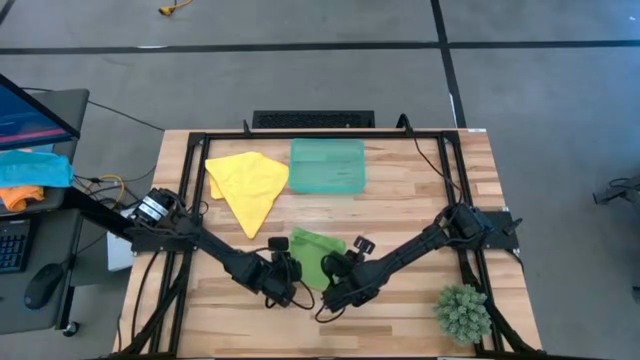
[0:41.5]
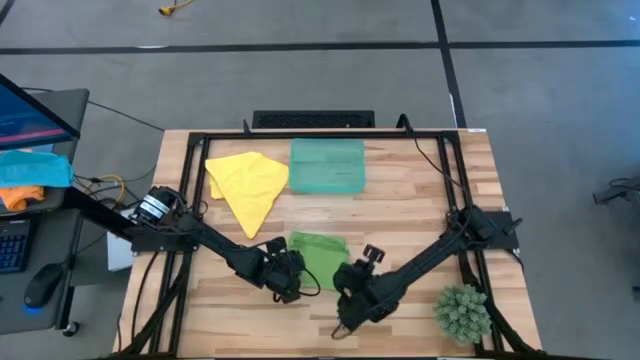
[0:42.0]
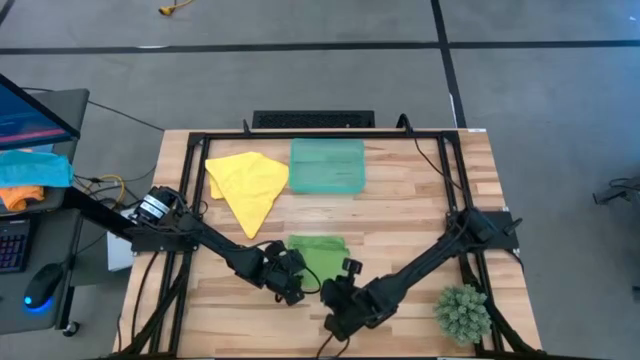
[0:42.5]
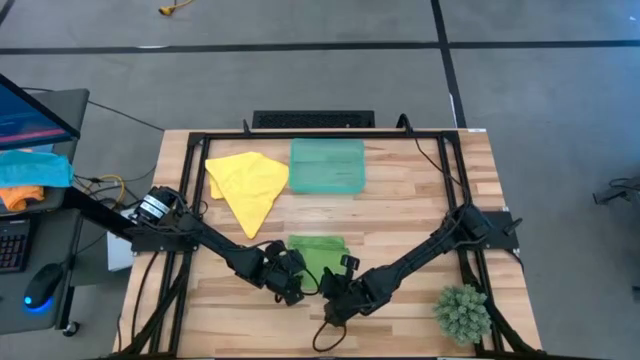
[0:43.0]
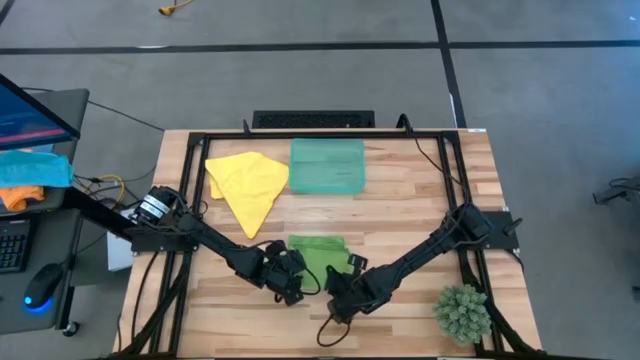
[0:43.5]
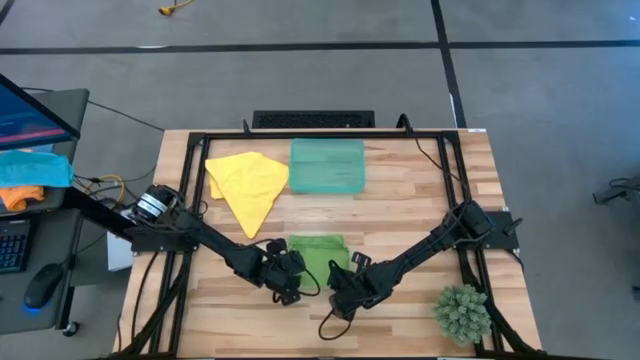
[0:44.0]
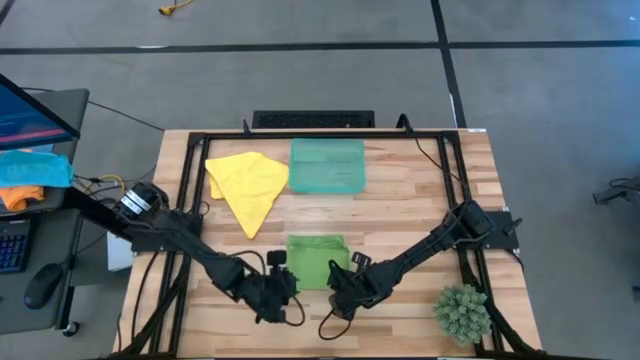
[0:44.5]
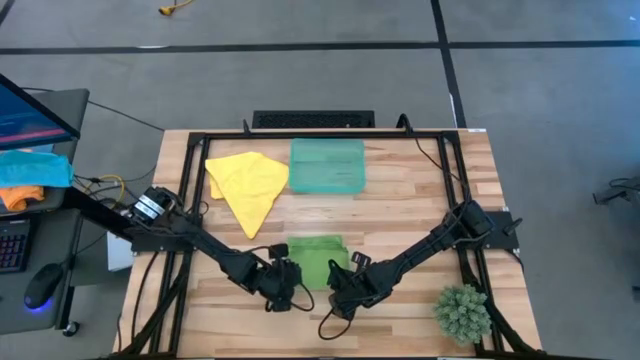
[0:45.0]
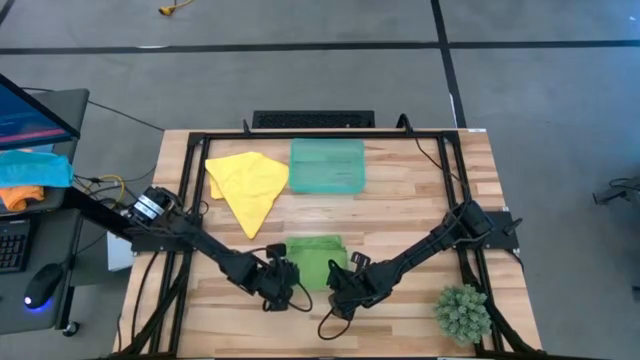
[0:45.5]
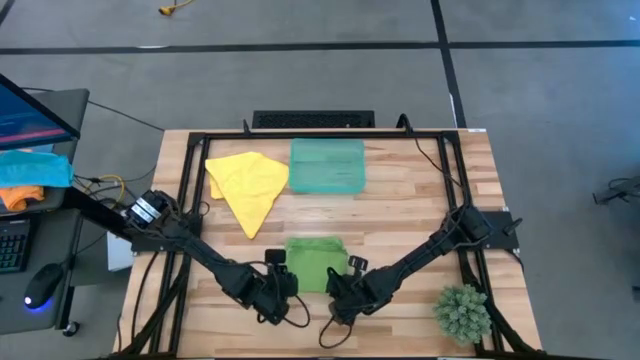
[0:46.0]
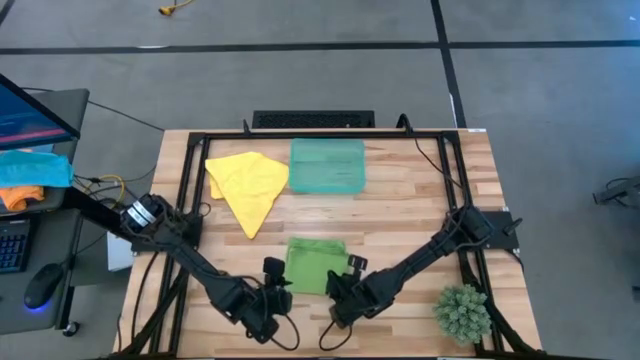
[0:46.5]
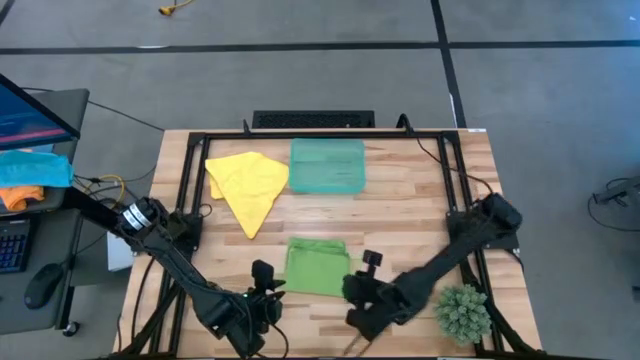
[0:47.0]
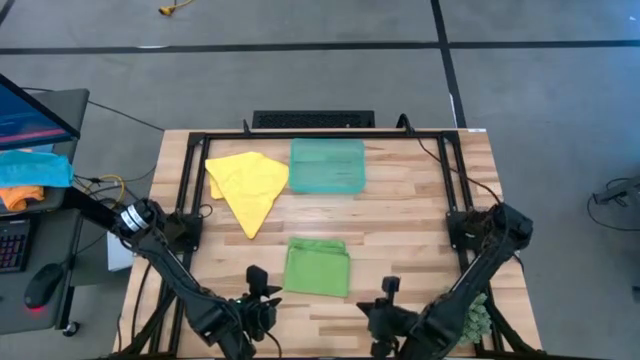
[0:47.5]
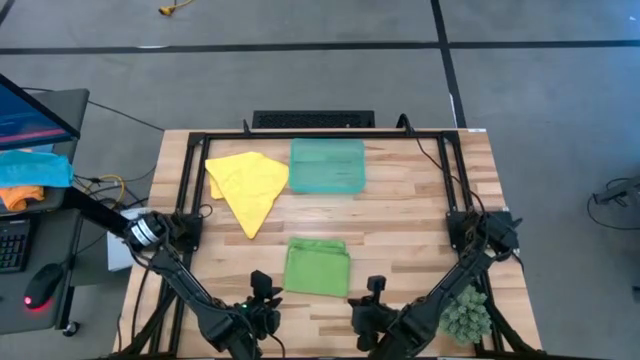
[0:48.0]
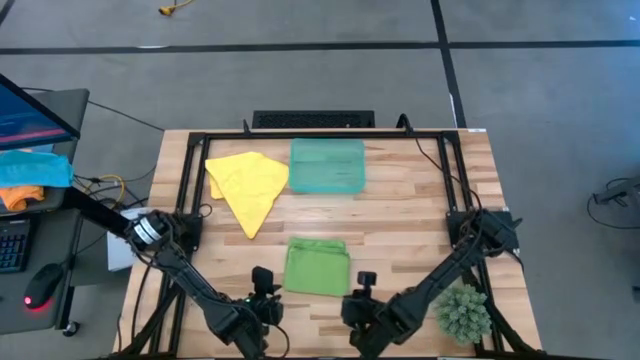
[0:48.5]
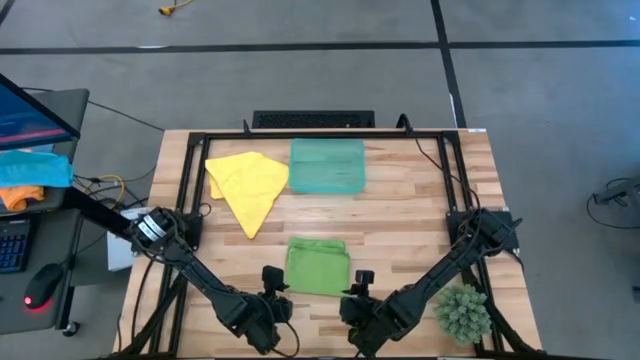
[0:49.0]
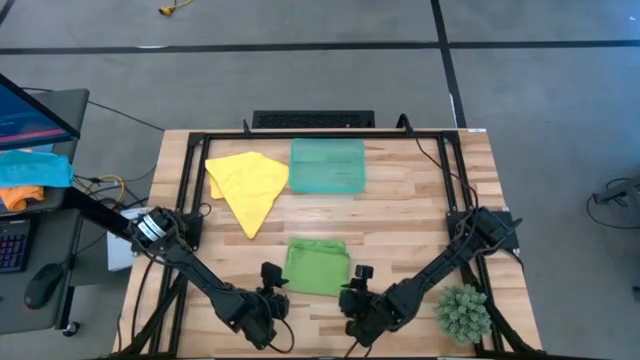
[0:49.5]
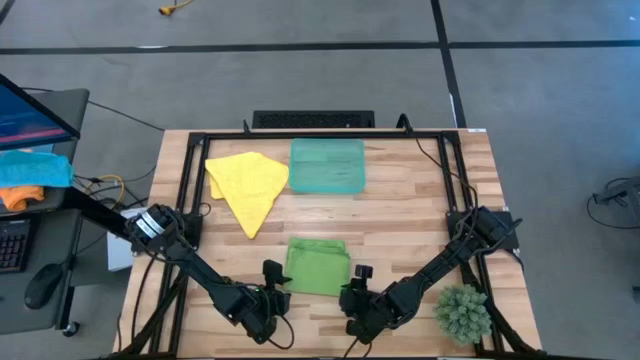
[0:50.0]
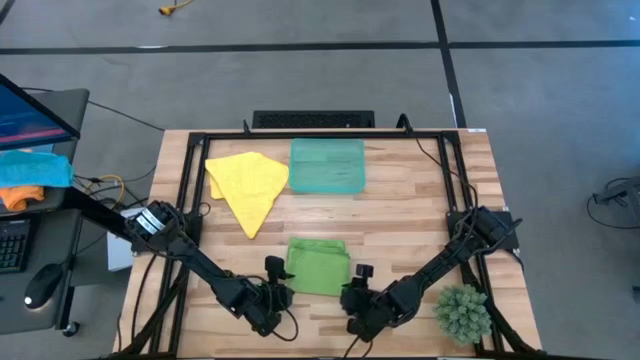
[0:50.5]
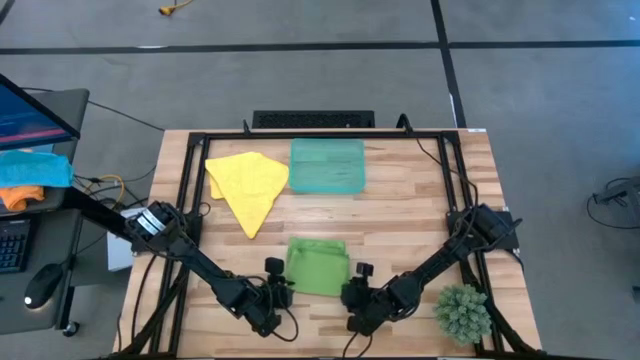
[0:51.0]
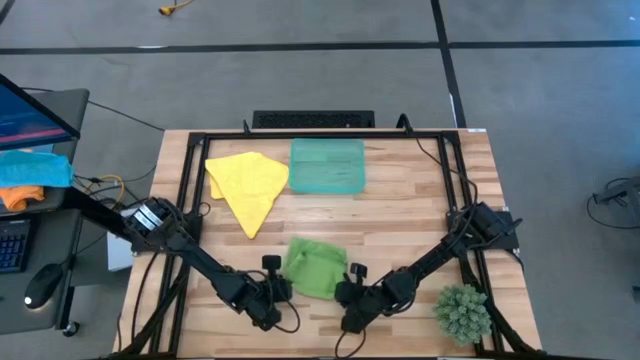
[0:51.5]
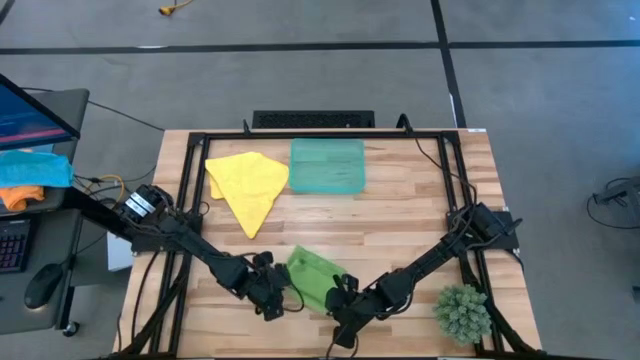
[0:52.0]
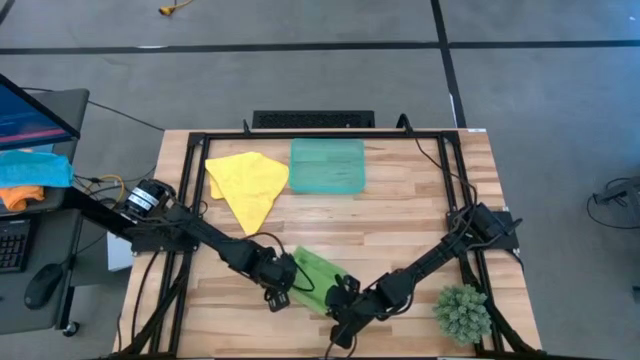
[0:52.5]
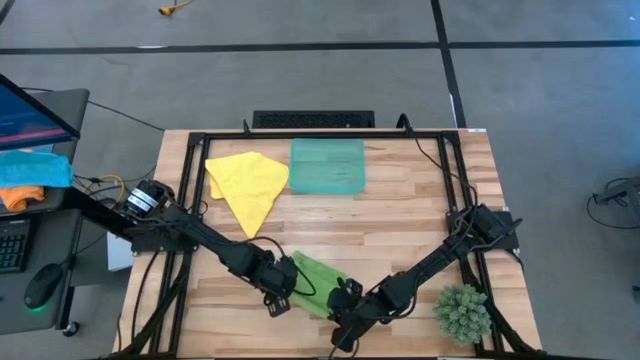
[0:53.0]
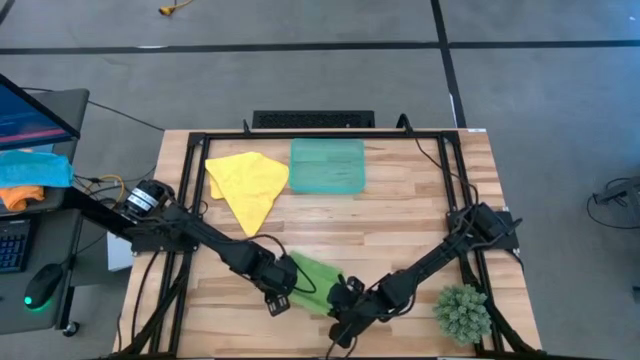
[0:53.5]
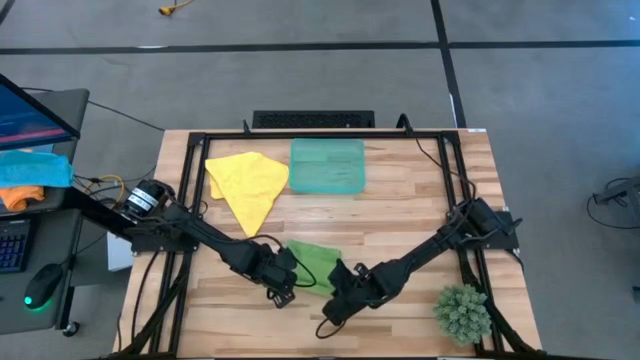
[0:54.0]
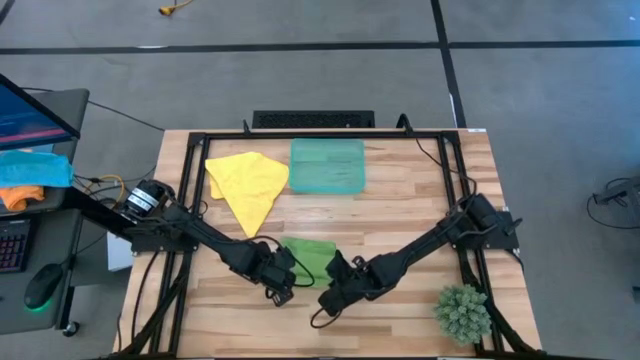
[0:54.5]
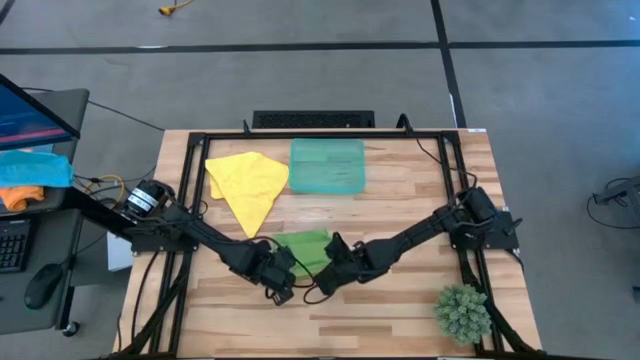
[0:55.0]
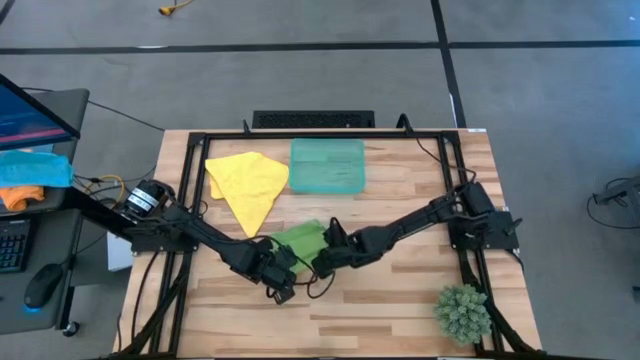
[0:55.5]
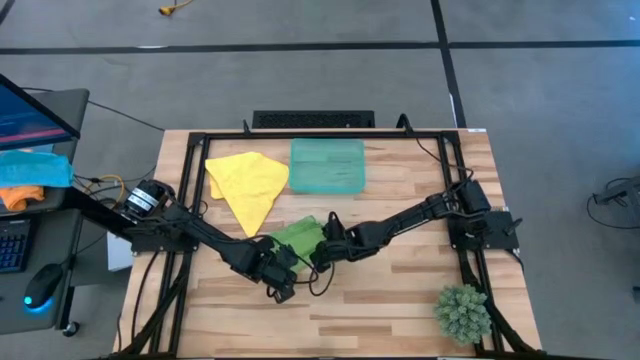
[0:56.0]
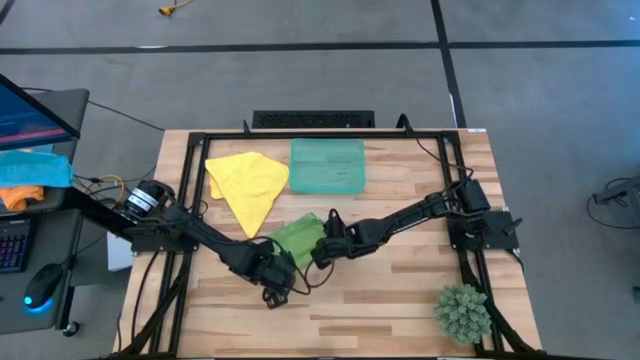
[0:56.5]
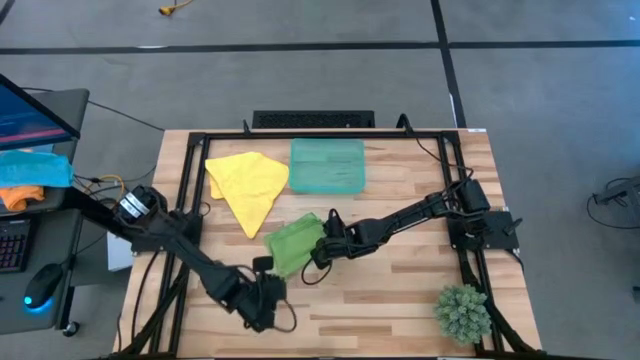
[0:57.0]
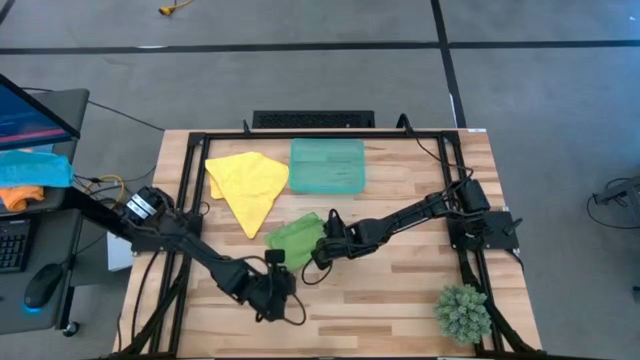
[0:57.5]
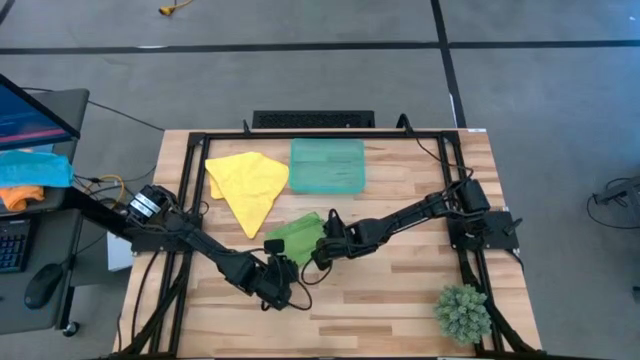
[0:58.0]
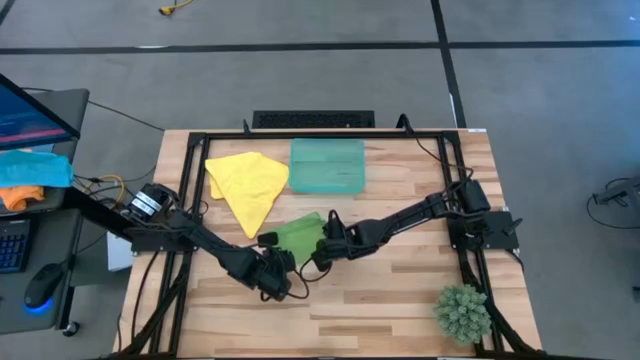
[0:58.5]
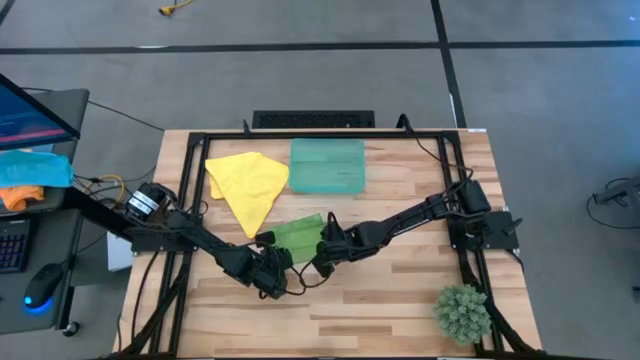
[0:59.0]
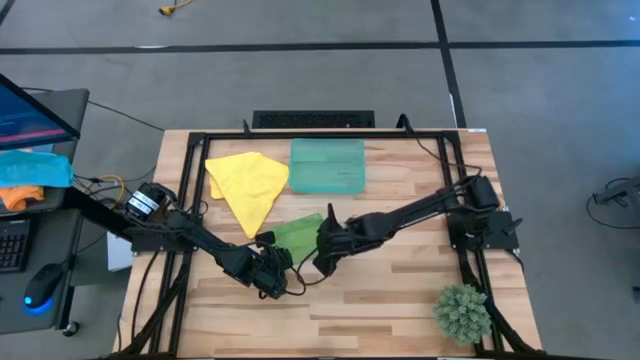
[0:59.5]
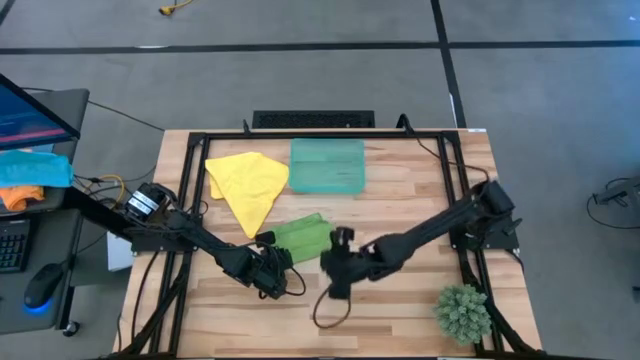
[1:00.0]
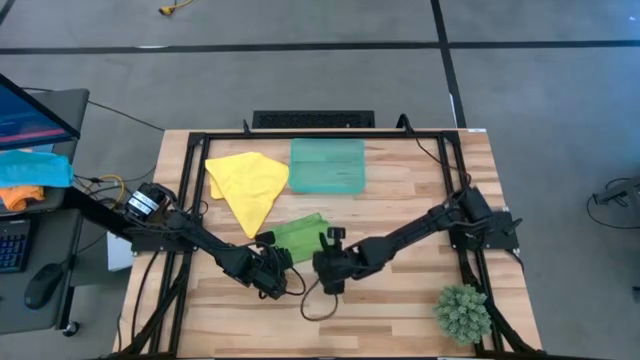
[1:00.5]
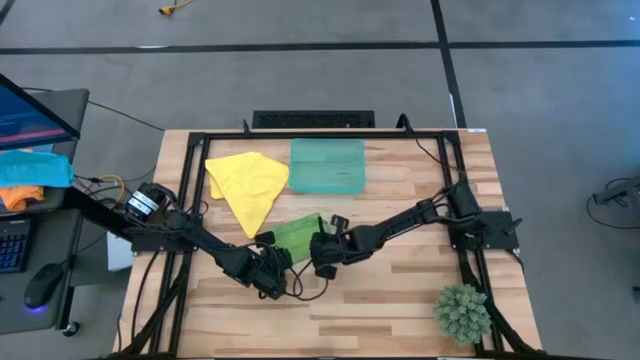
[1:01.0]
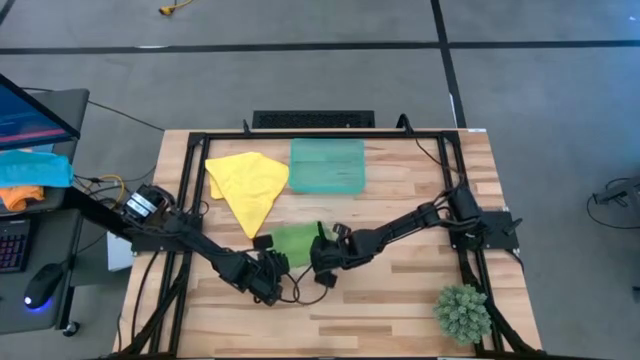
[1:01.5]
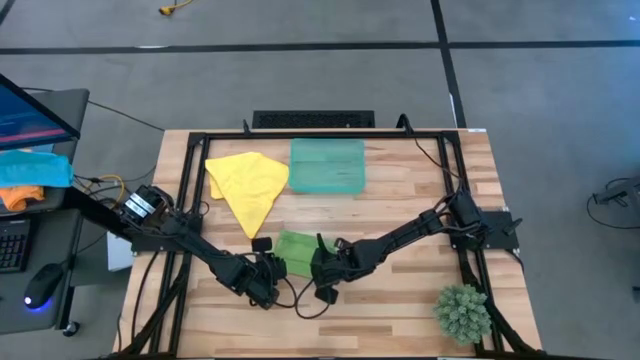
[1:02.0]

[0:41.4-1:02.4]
Task: Roll microfiber towels into tight, uniform cylinder then place into a basket
Roll the folded green microfiber towel
